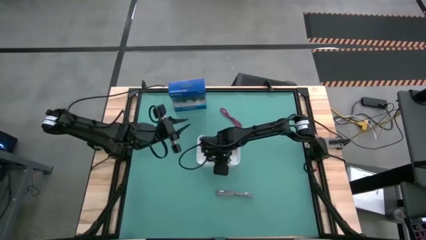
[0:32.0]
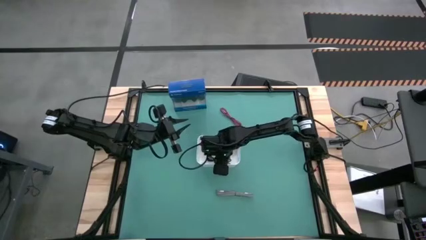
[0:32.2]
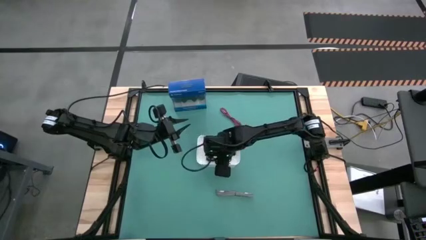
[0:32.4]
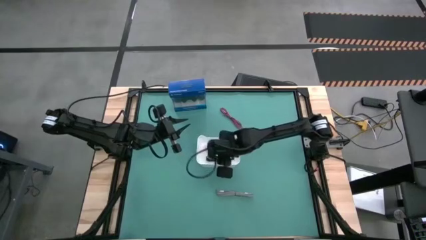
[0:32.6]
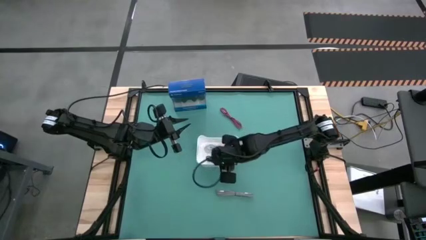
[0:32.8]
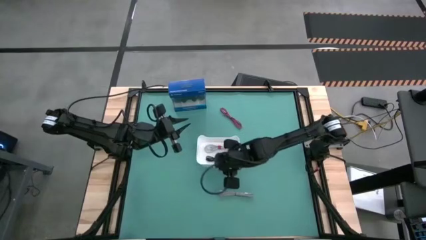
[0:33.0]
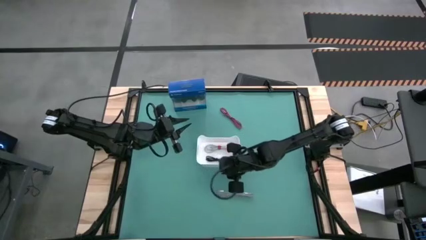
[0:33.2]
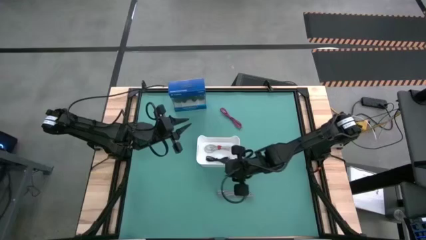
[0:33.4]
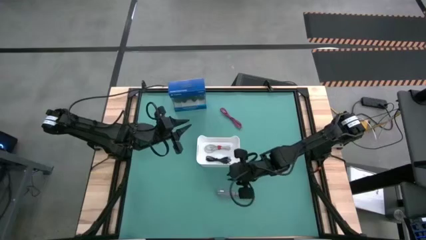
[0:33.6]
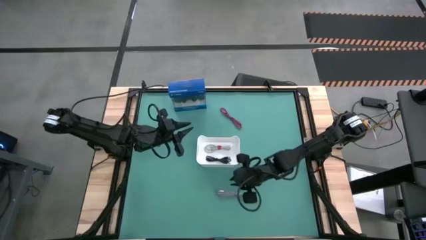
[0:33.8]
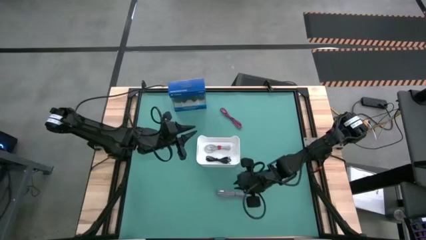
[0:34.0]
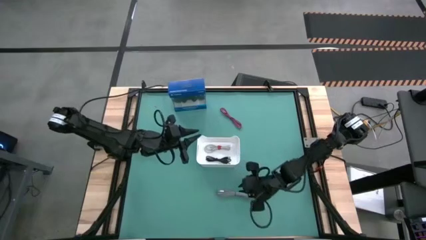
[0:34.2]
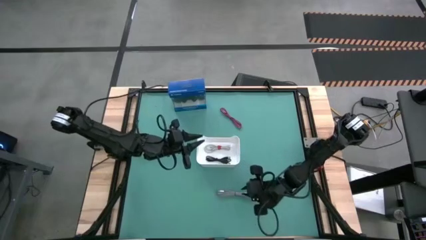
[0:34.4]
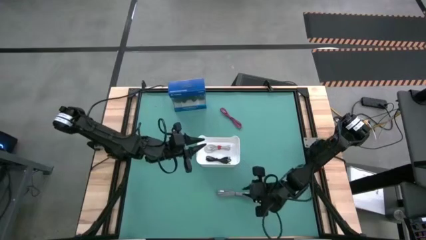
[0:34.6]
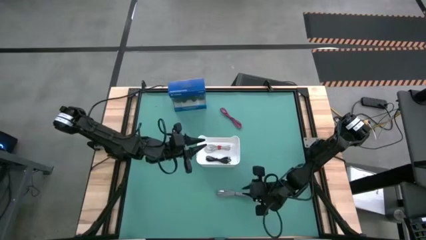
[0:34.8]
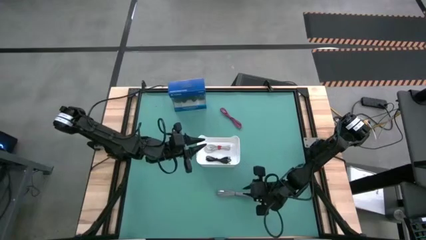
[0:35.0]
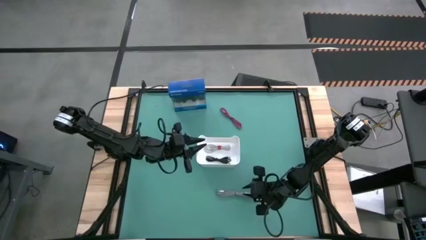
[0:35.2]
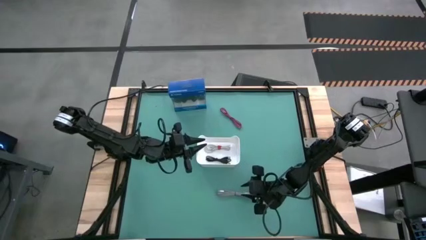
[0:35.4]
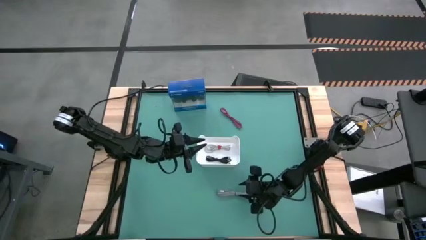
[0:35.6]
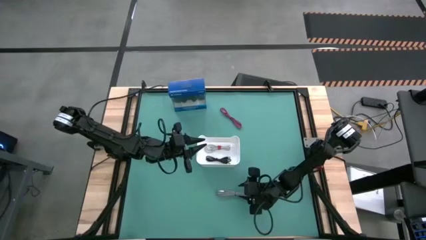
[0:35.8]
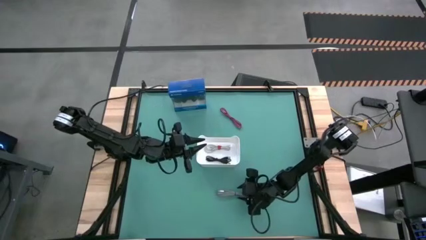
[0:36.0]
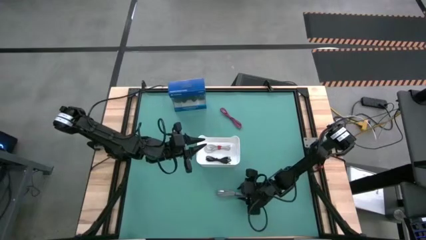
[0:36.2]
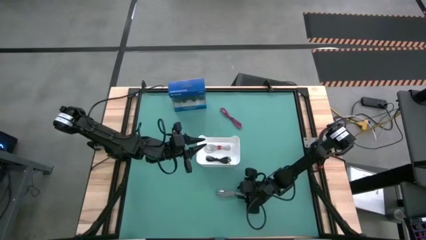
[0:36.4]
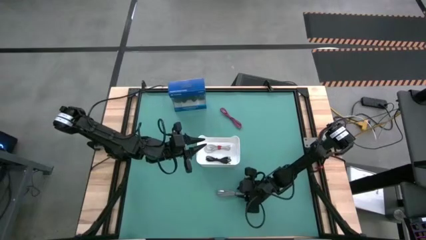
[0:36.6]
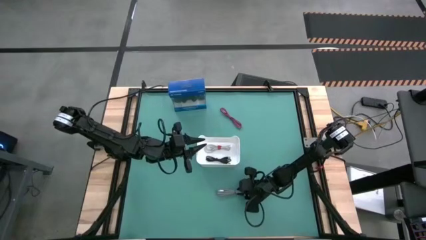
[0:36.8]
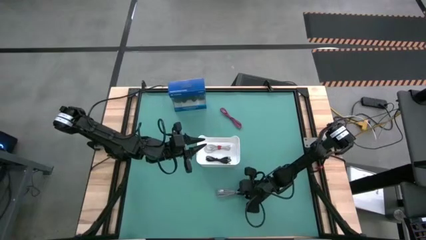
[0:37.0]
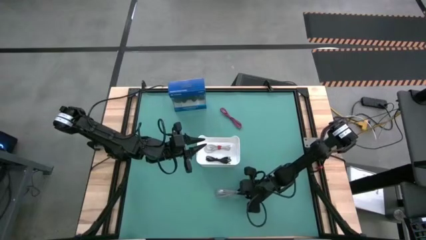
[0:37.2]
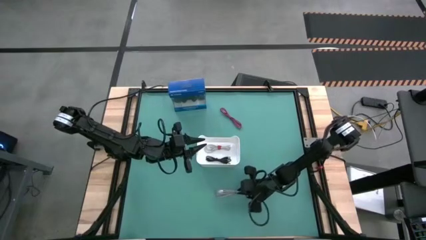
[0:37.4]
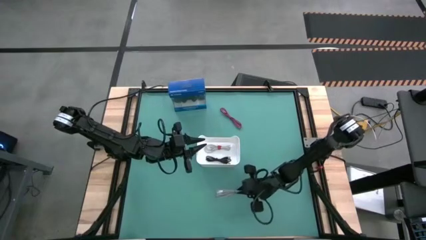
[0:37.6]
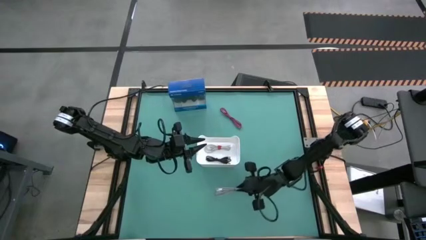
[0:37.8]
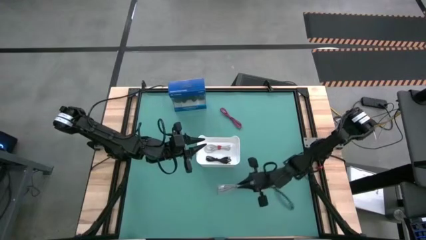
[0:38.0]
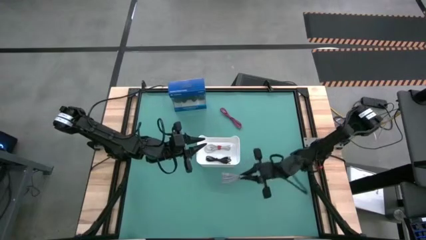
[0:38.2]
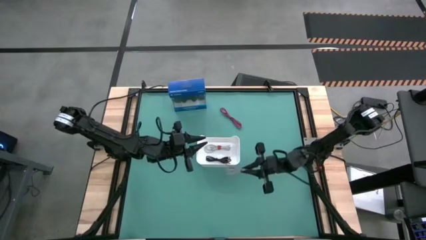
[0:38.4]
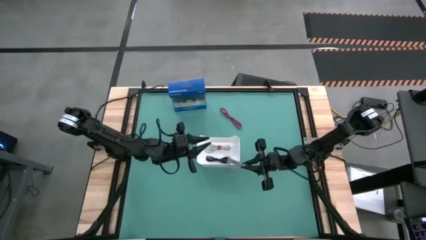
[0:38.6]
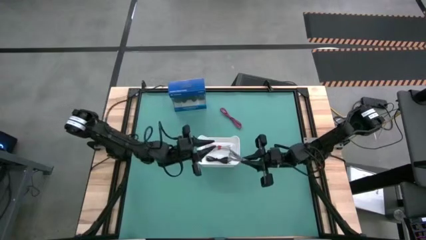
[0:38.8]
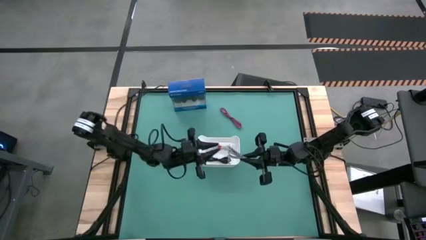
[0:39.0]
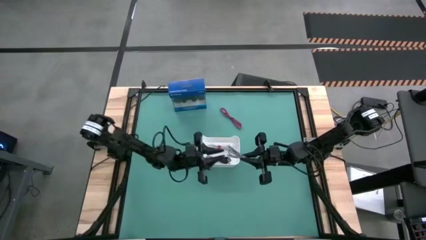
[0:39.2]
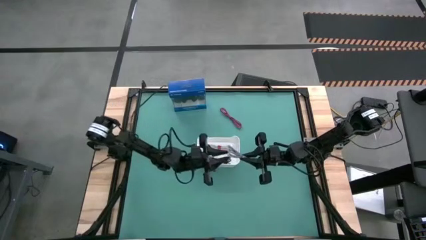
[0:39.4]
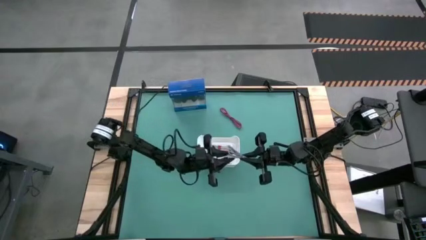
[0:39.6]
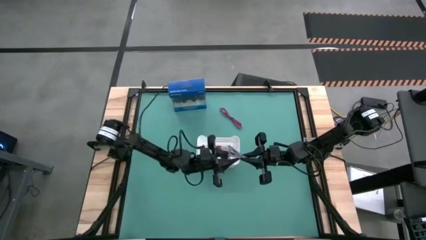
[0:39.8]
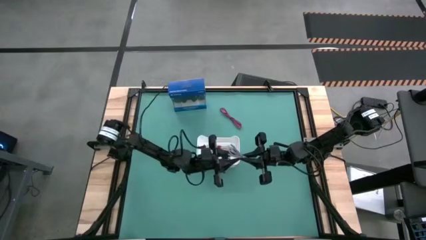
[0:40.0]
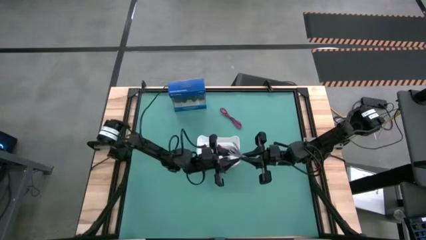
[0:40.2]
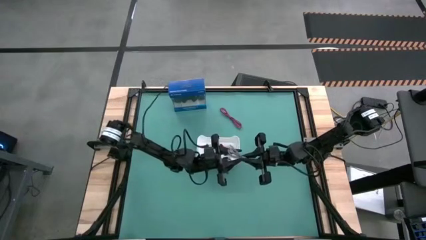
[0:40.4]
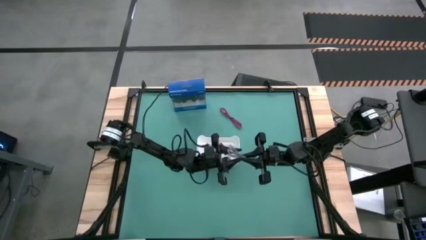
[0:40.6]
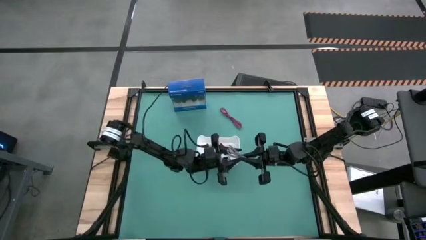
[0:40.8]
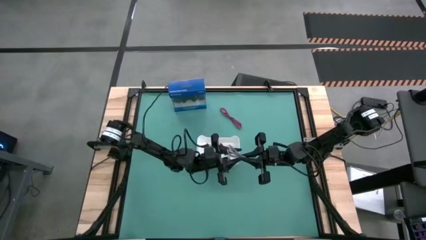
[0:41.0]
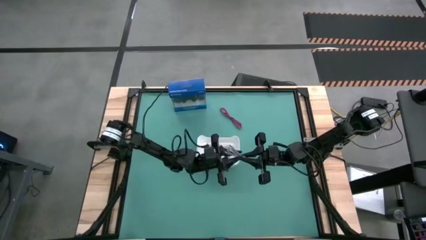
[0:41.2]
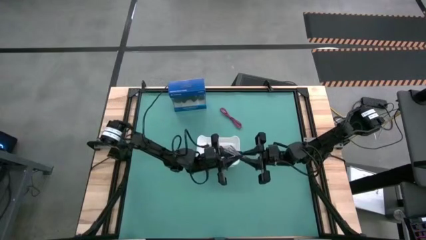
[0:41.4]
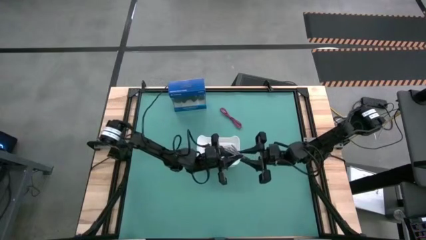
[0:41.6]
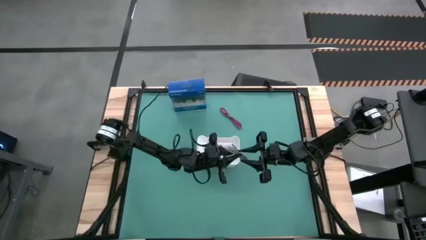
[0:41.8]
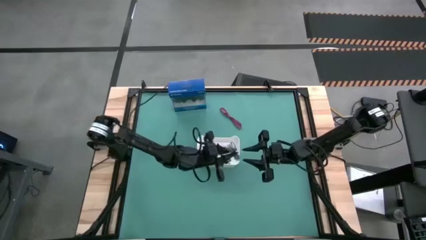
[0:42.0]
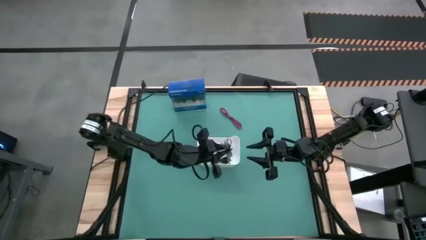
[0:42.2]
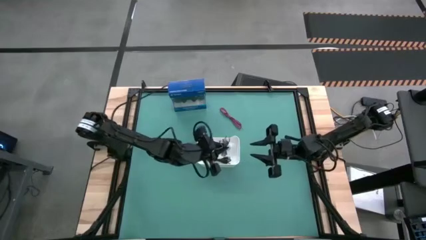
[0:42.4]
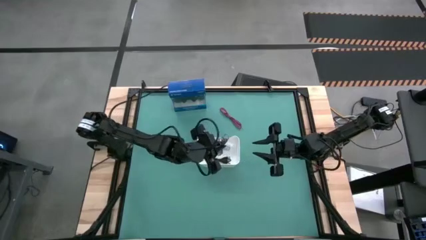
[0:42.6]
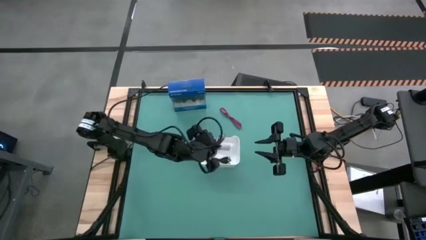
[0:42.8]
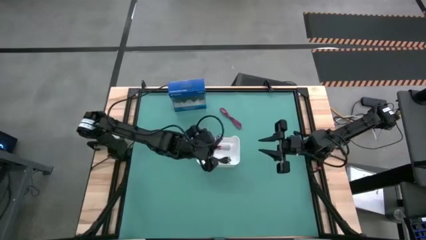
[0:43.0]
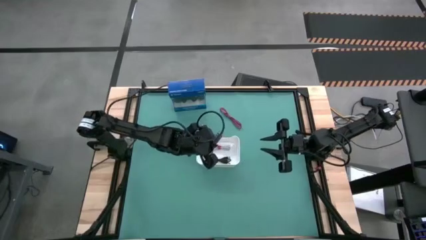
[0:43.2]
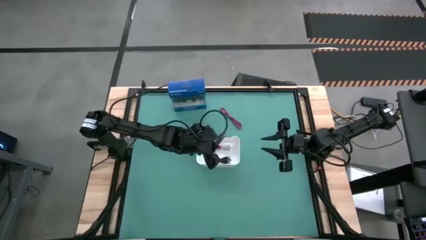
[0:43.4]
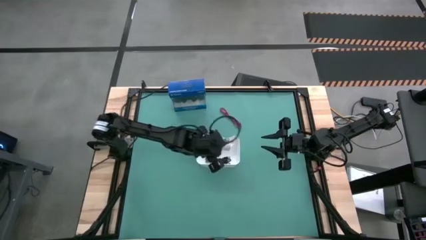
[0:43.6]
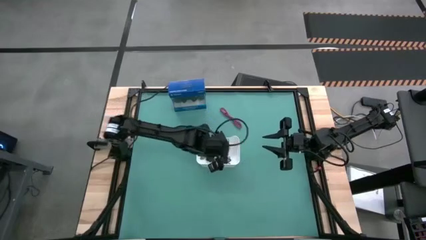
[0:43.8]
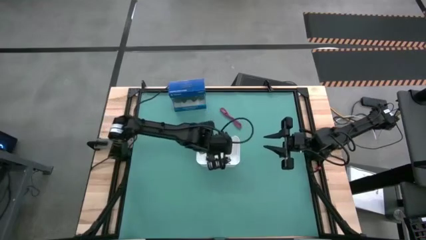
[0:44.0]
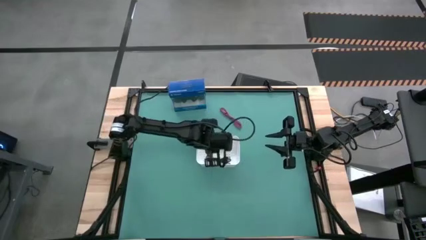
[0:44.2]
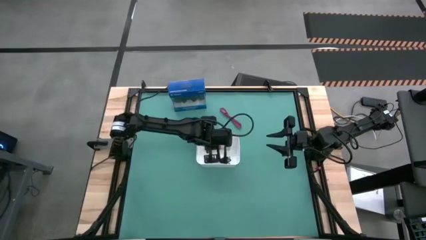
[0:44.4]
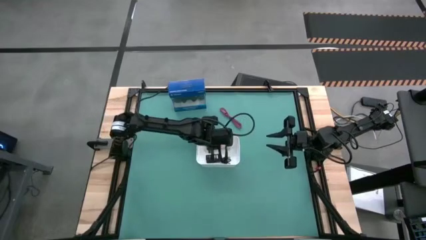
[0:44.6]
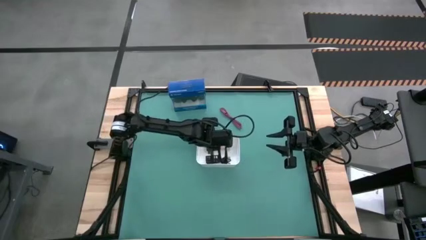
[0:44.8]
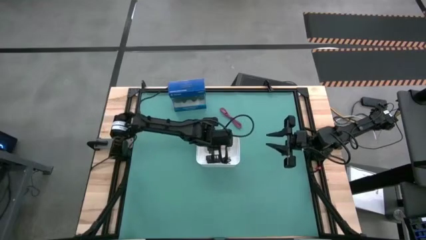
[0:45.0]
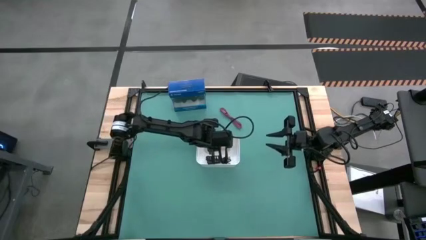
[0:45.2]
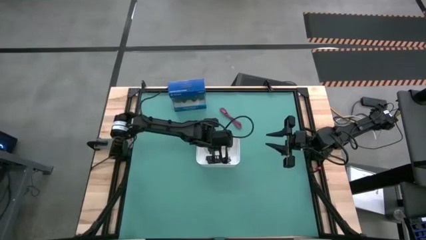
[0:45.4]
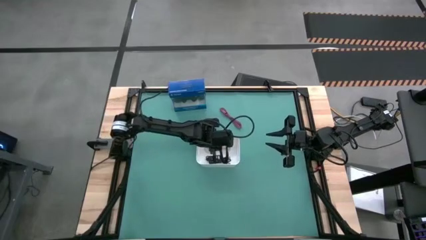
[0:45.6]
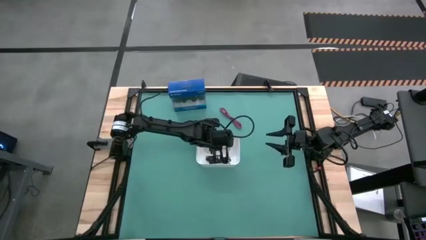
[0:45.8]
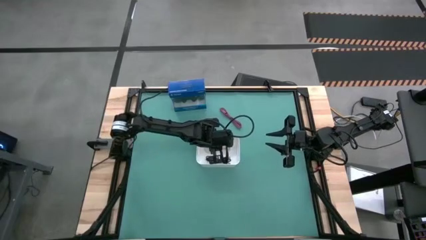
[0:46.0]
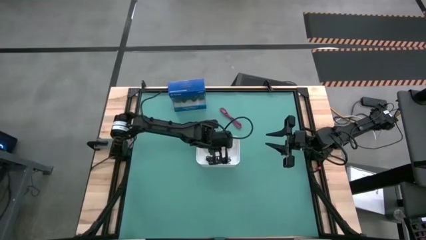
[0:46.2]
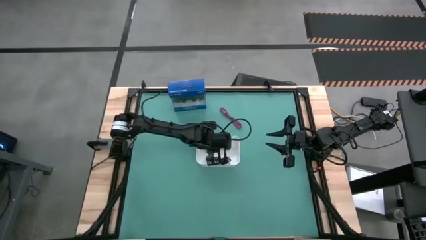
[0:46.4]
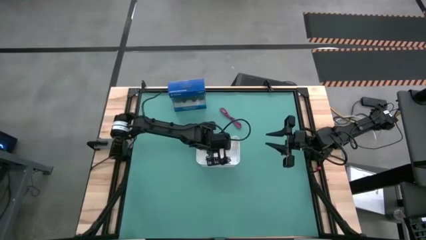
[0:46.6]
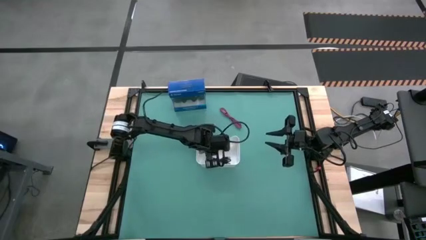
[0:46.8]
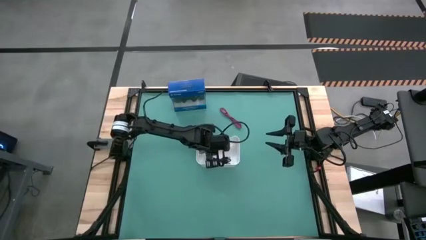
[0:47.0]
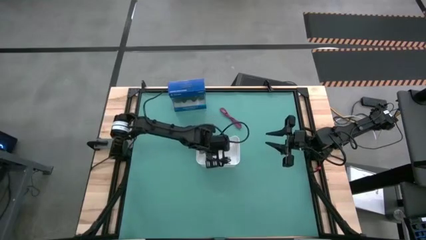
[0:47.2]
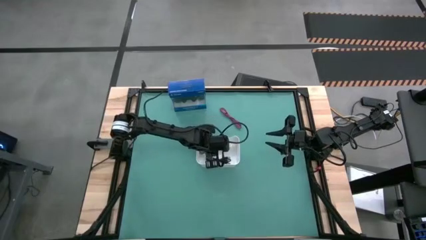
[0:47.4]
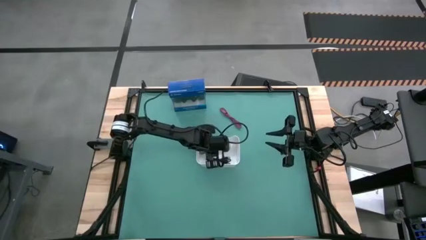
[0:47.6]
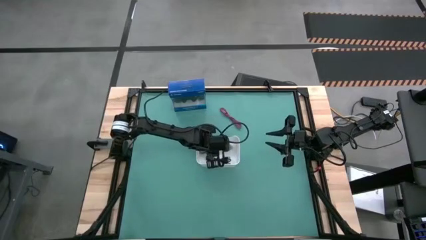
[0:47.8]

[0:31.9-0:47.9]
Task: Pick and place USB-C Cables
Put the white black charger cable into the white bin

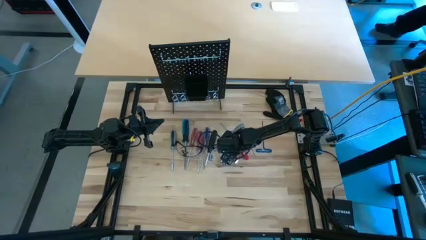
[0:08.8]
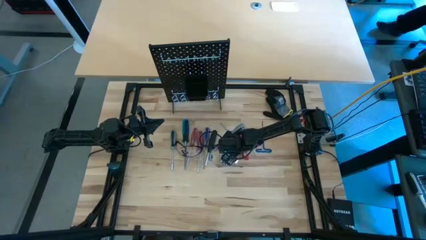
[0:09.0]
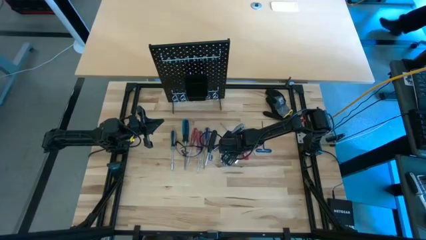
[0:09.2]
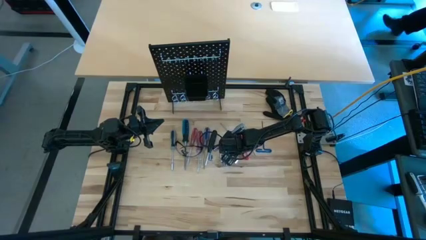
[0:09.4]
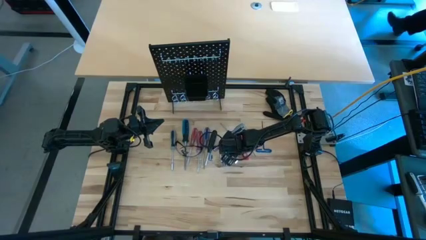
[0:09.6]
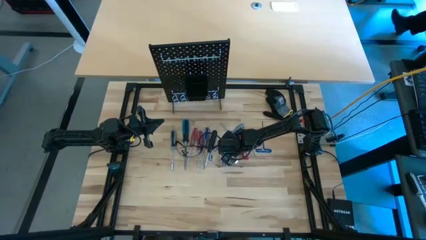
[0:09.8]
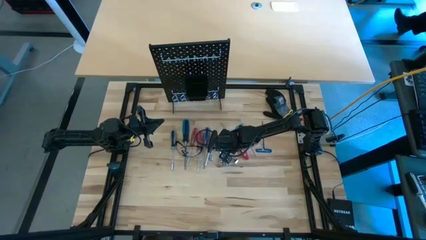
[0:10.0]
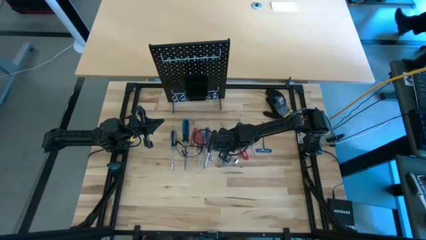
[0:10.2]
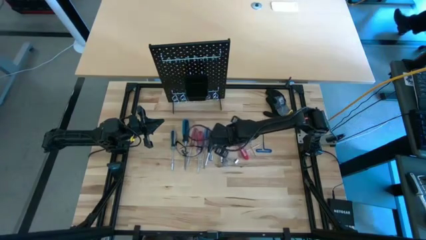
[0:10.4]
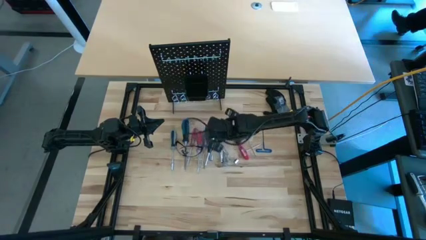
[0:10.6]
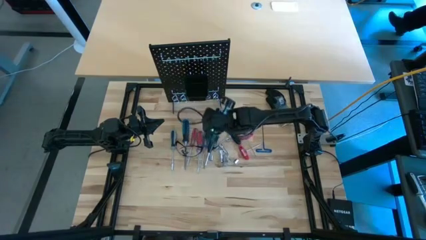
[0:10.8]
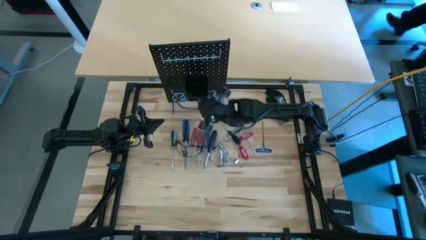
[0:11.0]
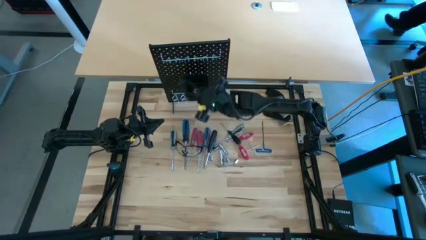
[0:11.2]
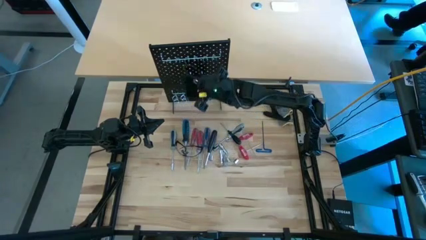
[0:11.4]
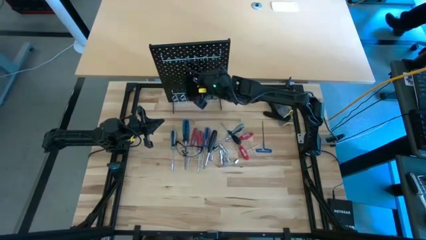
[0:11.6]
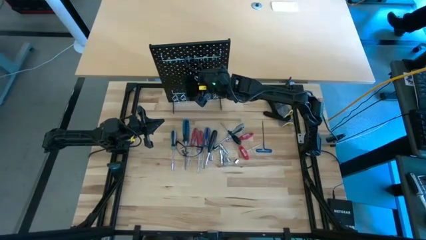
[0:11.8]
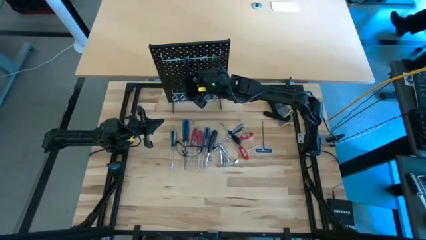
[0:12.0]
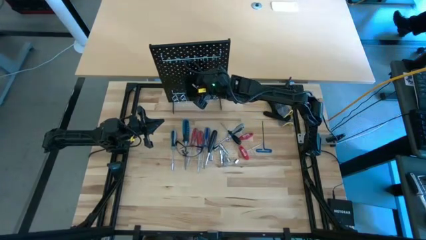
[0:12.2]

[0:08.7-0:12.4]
Task: Hang tools onto peg board
Put the right metal extension bar into the black bin on the peg board
